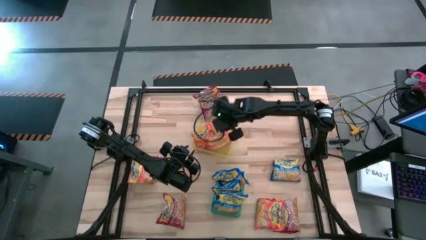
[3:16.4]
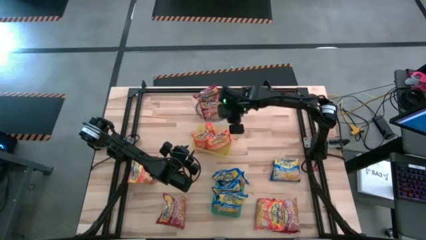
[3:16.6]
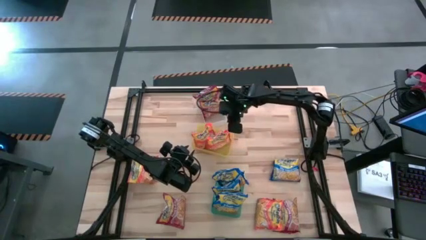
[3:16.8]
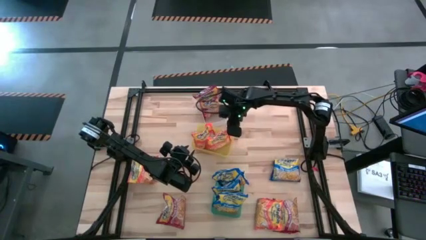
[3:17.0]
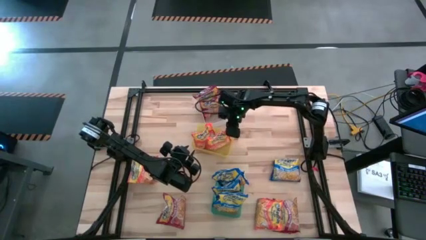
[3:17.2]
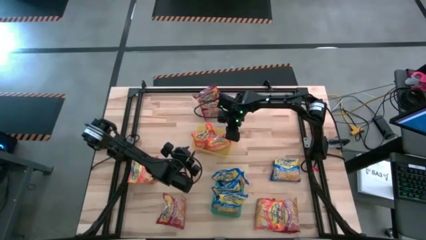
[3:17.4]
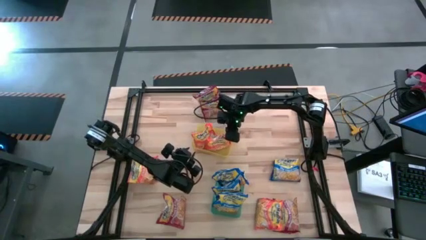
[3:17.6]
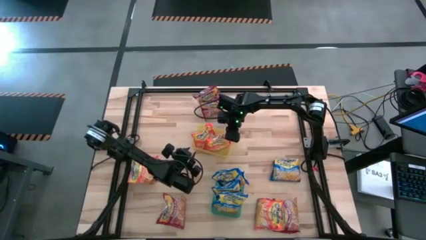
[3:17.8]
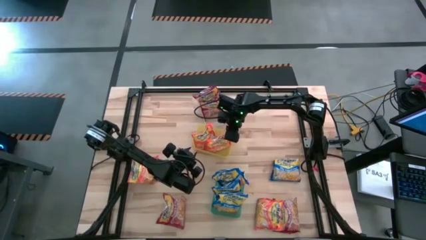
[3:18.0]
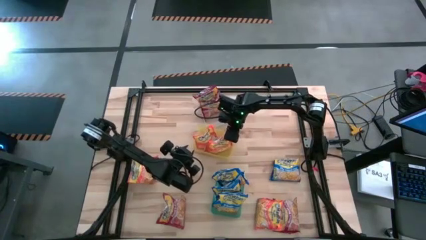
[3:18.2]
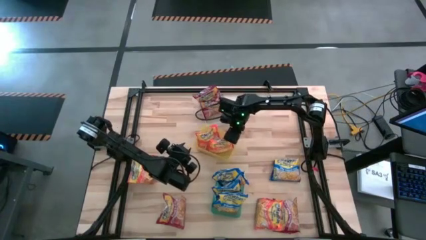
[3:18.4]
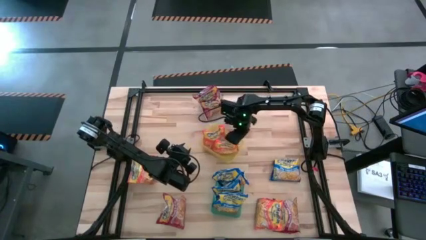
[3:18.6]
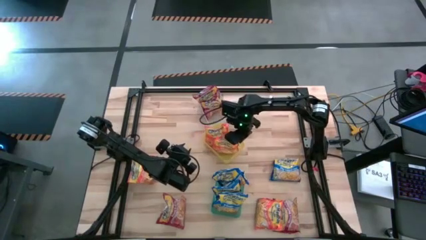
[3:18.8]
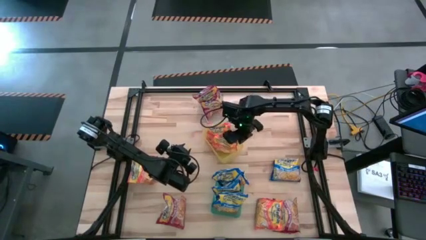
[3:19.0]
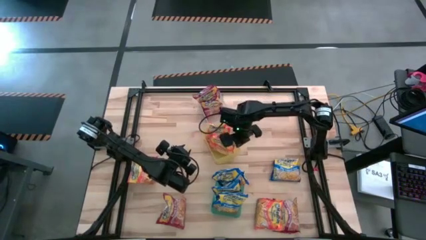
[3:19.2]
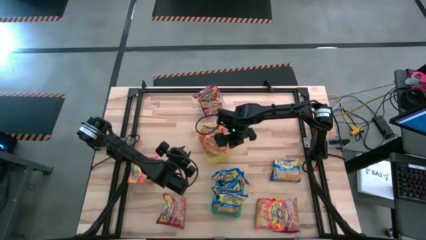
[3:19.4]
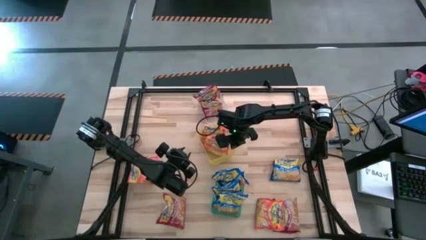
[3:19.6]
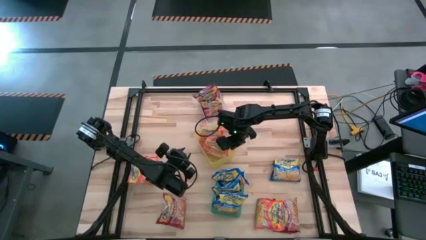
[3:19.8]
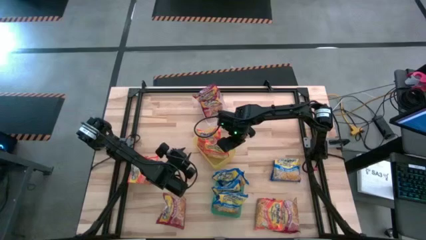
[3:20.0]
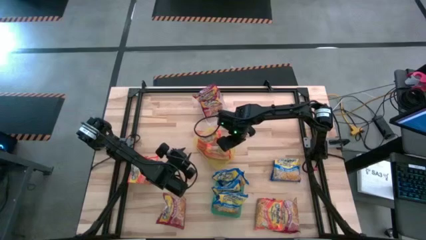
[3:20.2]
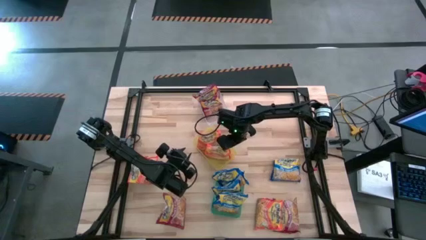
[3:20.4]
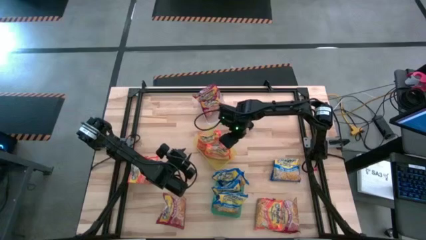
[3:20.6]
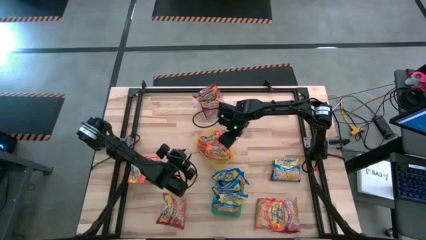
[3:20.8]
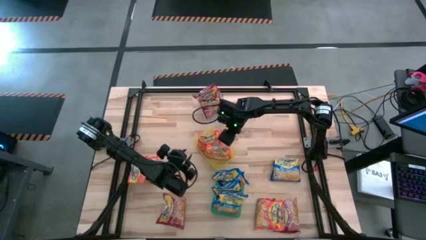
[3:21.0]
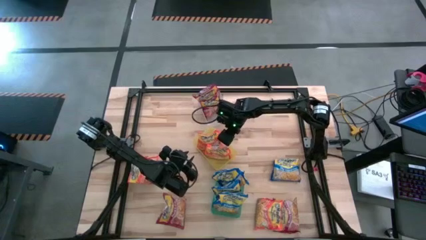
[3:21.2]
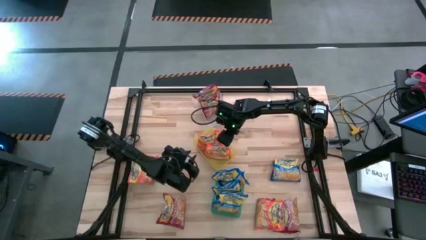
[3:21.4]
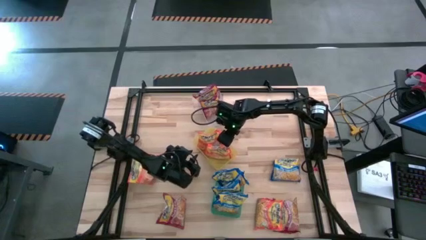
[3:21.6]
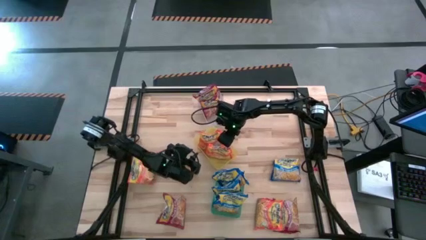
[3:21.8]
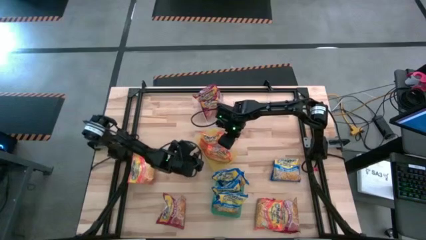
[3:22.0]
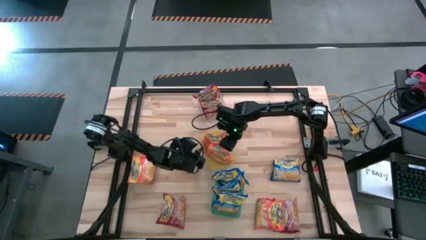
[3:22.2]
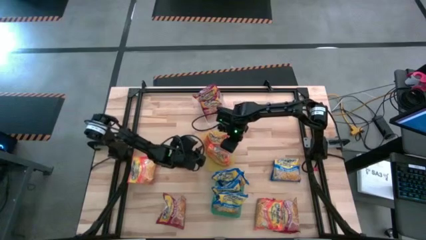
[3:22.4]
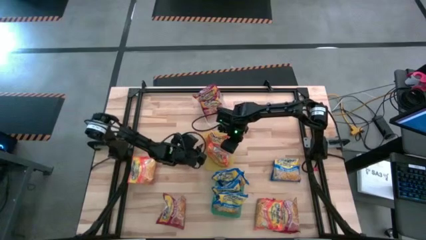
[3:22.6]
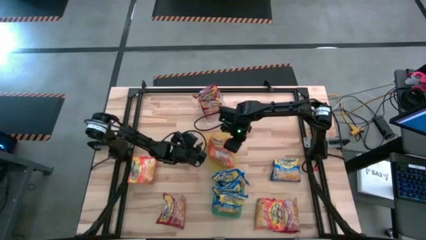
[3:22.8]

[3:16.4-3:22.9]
Task: Sort Maruchan noodles
Adjust the yellow bin

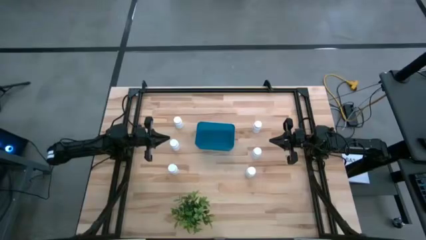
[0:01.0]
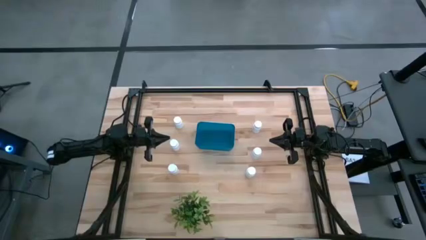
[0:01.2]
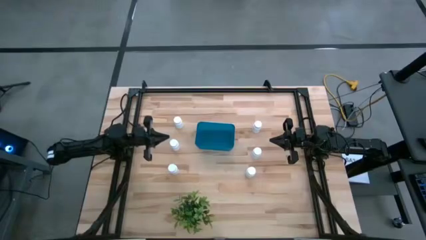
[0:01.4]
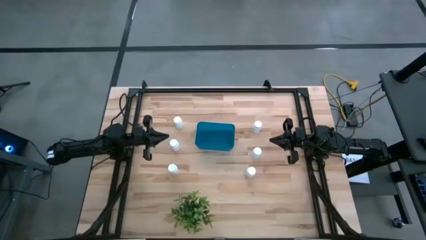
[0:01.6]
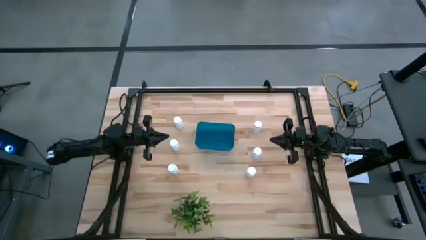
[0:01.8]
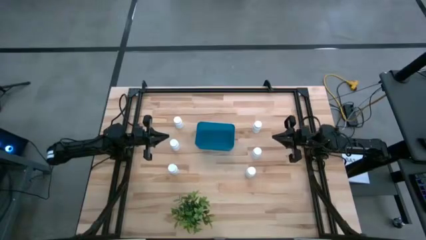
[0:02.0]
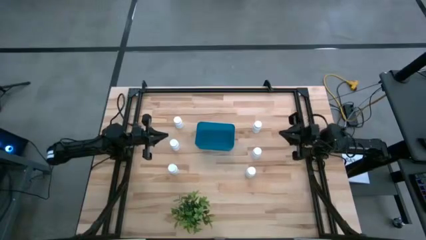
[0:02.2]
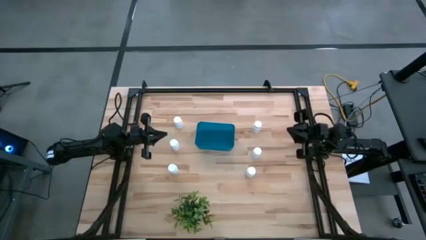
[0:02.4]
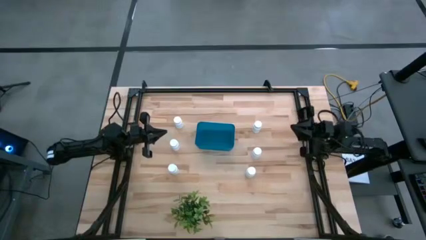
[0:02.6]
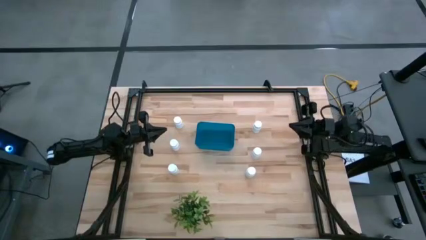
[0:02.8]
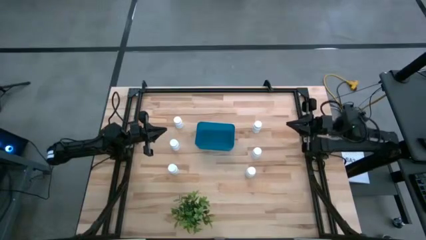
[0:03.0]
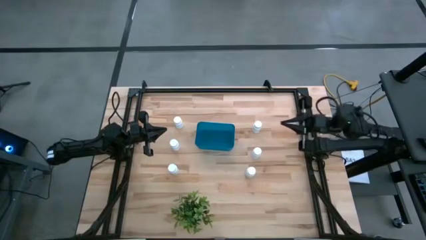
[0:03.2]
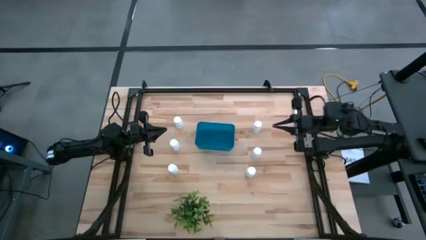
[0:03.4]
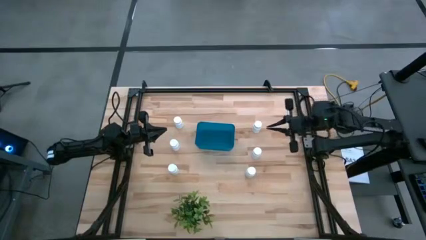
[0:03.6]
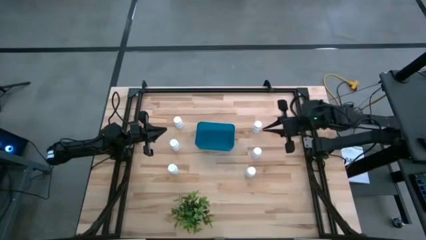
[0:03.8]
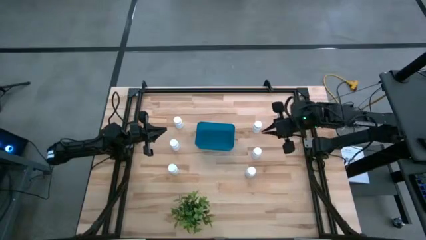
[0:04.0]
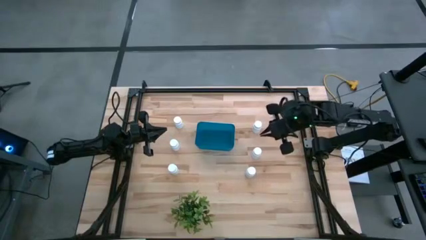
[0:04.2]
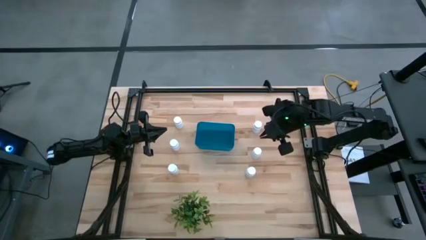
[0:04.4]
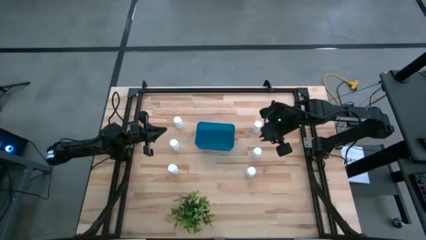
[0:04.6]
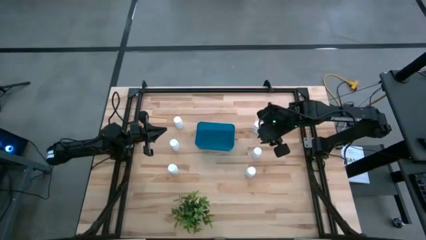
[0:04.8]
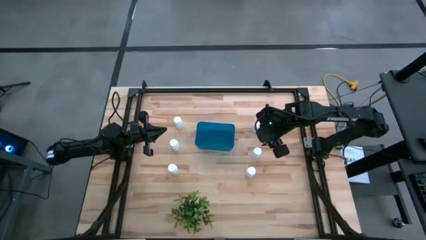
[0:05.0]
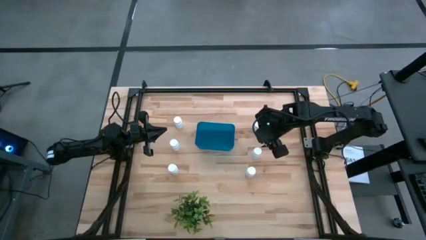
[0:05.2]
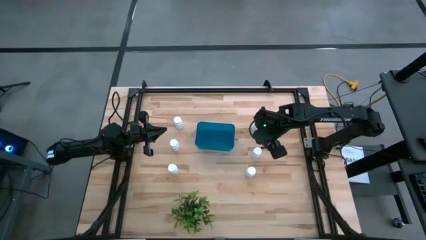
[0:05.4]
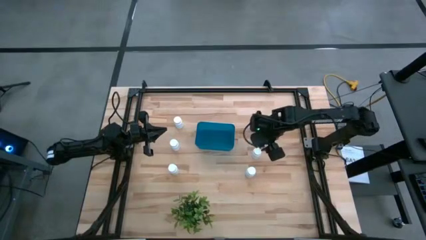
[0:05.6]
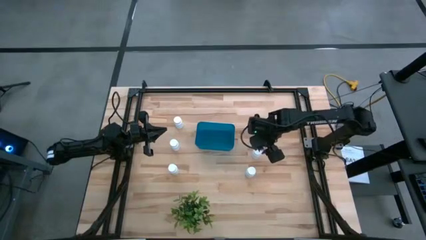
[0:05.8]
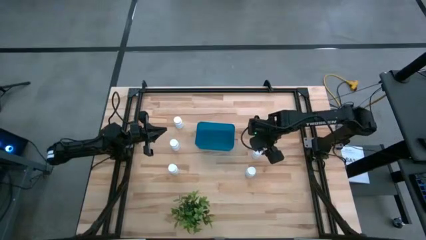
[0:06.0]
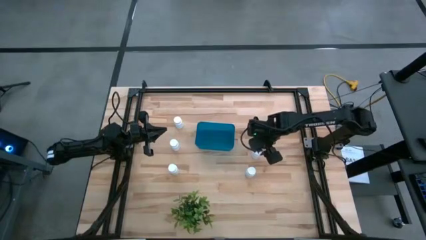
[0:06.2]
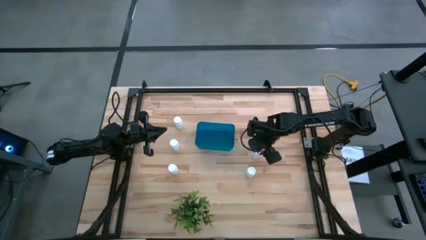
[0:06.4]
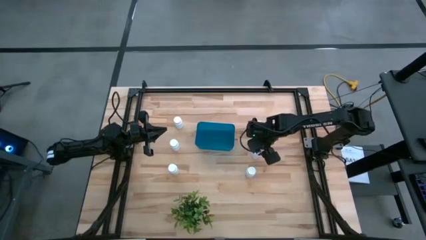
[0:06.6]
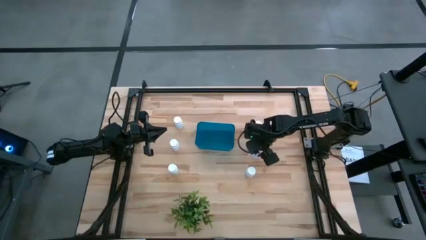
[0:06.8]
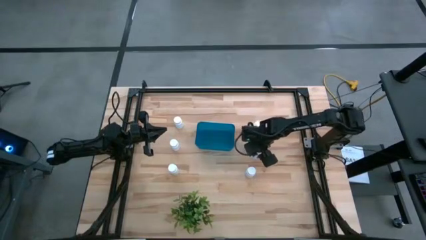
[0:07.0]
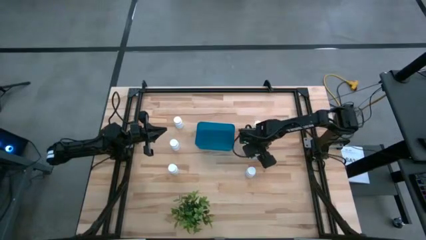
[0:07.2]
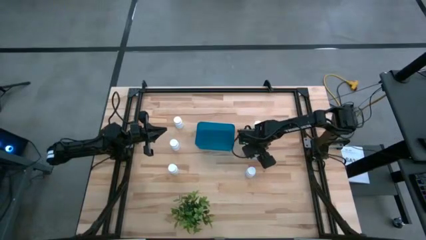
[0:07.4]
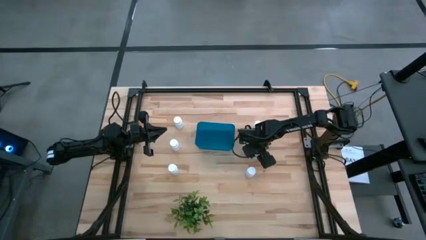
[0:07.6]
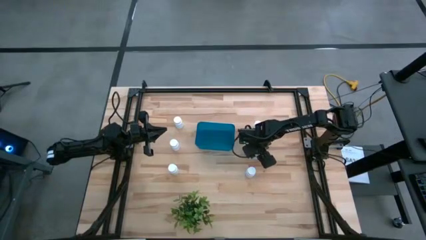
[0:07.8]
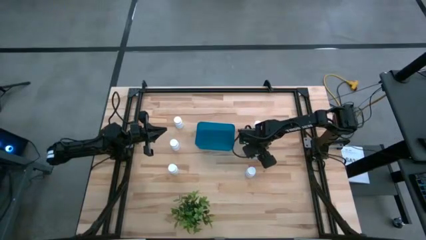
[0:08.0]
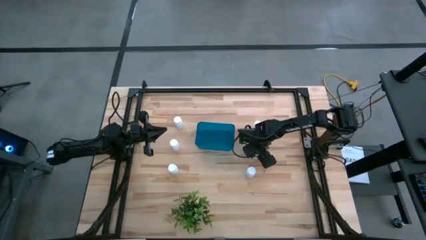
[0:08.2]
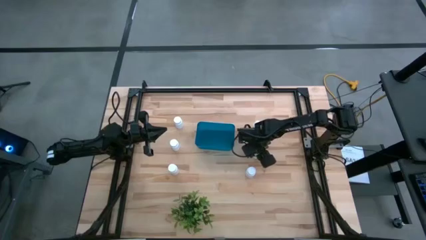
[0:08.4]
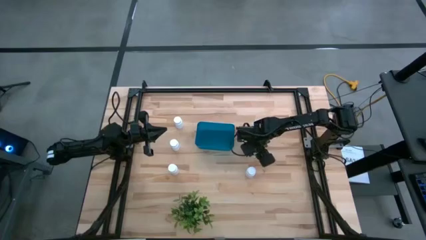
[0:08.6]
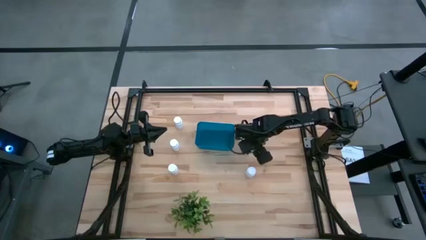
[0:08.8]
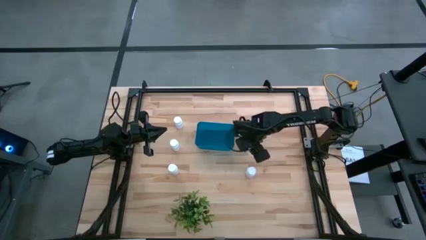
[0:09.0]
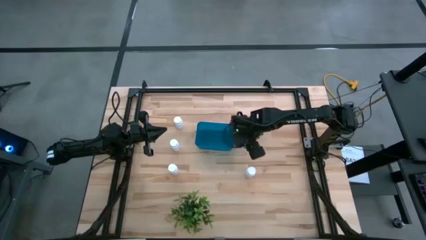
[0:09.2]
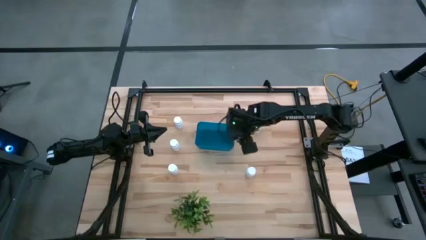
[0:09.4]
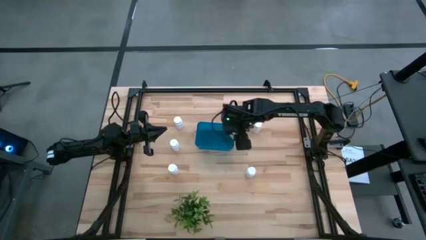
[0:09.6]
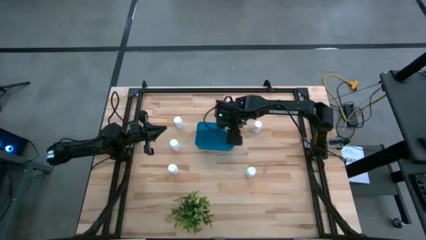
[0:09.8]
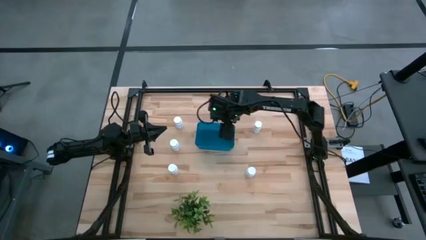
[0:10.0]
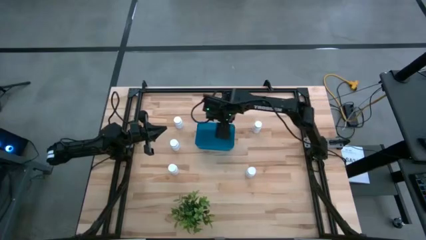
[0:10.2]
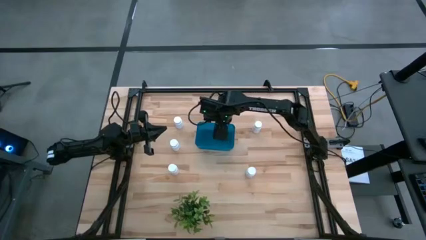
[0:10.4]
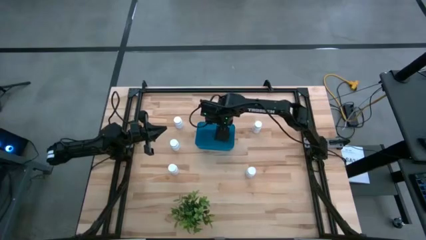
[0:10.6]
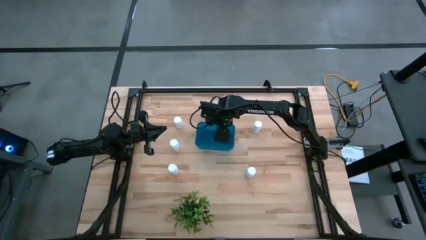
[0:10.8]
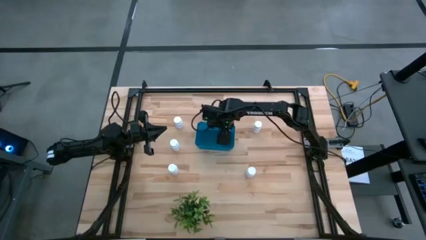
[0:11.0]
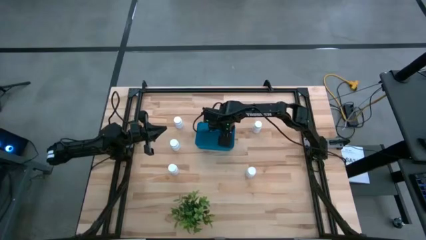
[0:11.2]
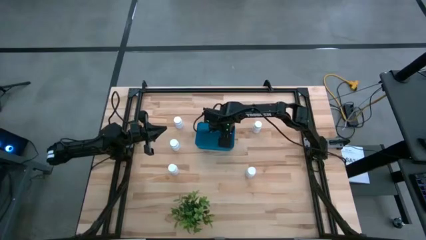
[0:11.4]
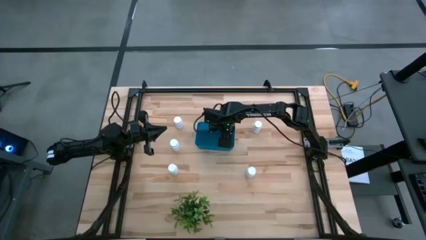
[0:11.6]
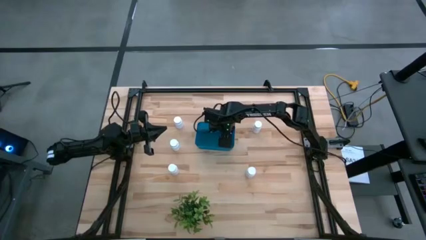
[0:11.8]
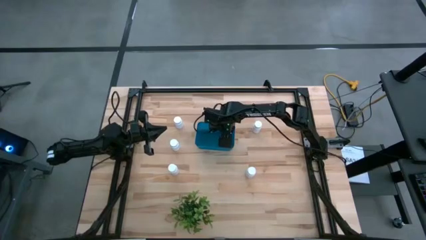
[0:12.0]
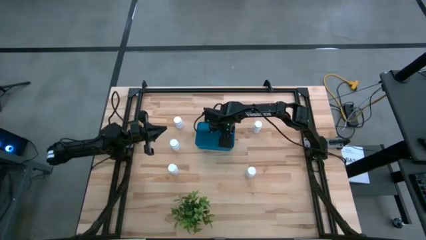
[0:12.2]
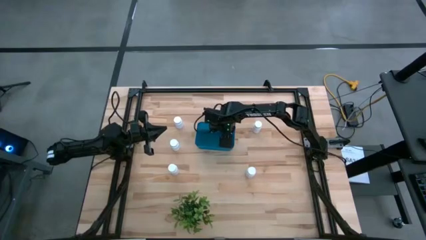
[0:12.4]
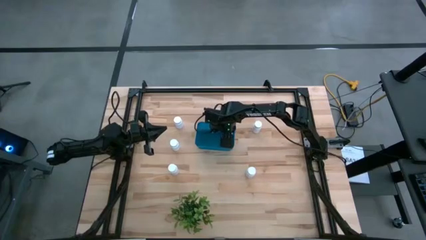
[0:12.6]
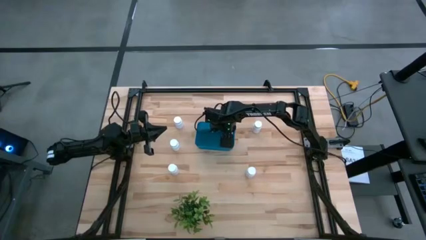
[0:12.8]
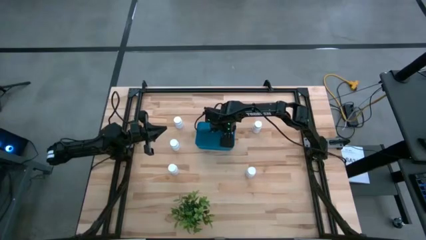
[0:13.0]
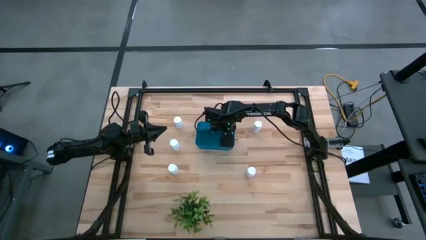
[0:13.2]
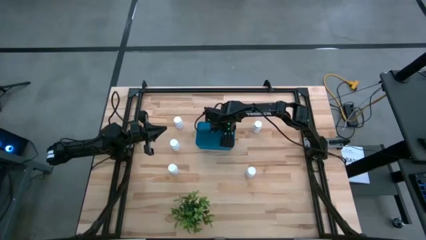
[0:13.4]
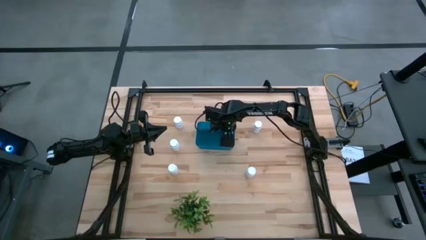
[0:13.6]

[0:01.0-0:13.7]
Task: Pick and place pill bottles into a basket
Put the white medicine bottle into the blue bin
